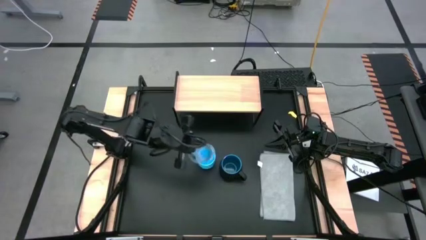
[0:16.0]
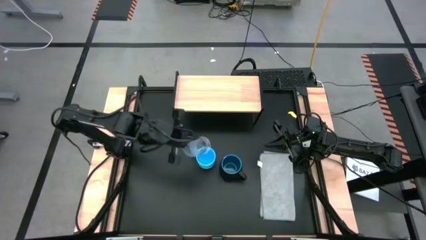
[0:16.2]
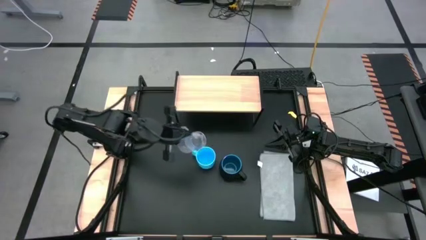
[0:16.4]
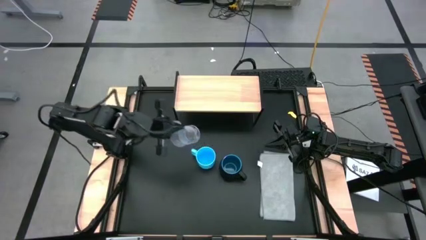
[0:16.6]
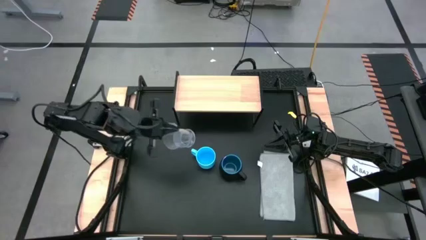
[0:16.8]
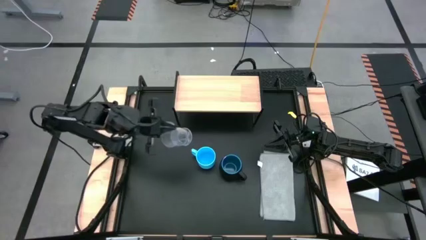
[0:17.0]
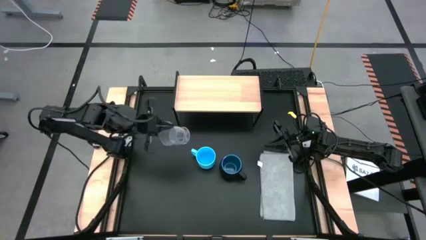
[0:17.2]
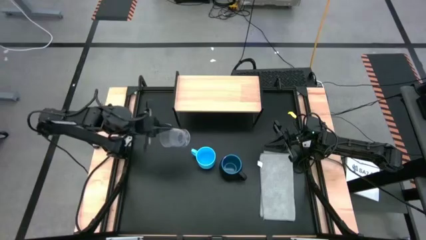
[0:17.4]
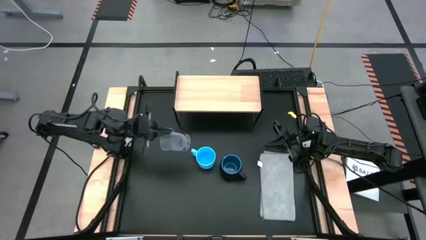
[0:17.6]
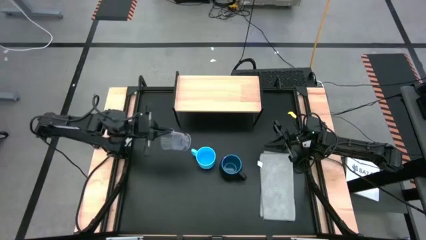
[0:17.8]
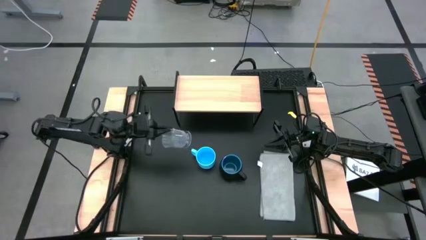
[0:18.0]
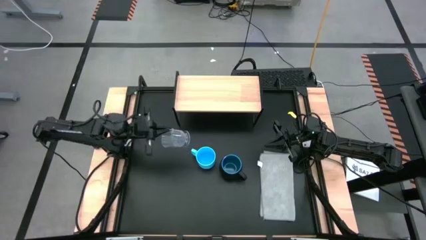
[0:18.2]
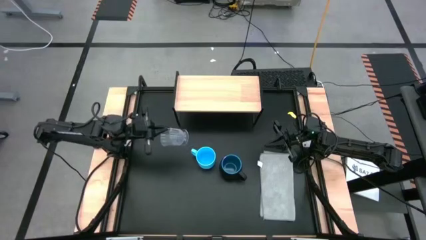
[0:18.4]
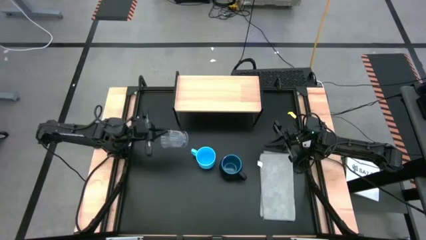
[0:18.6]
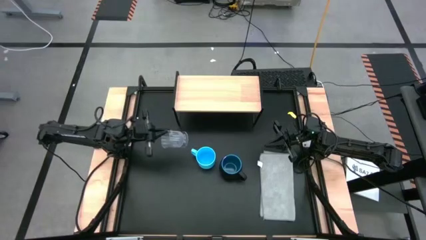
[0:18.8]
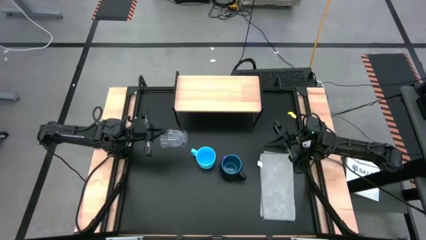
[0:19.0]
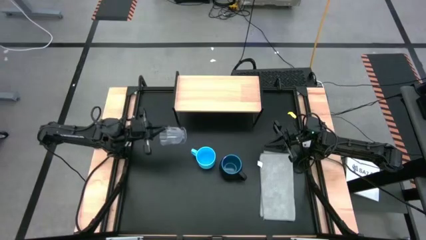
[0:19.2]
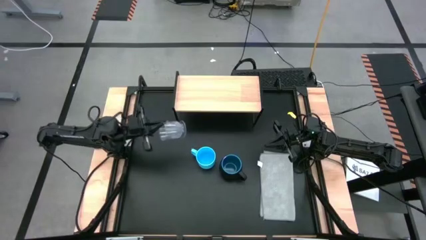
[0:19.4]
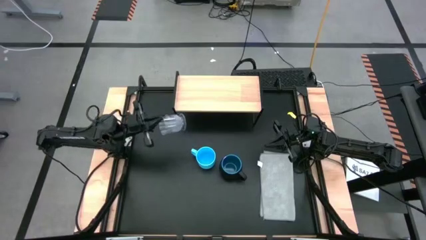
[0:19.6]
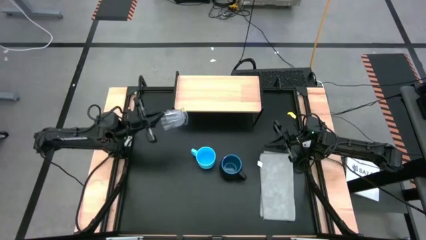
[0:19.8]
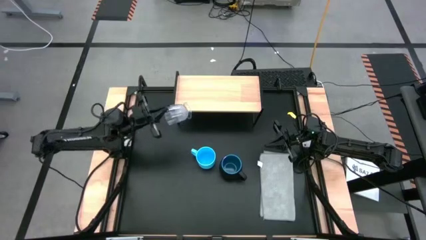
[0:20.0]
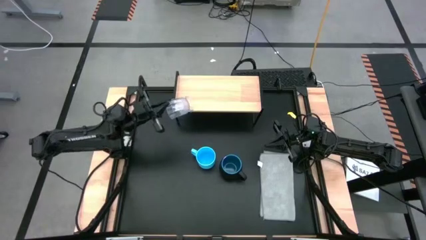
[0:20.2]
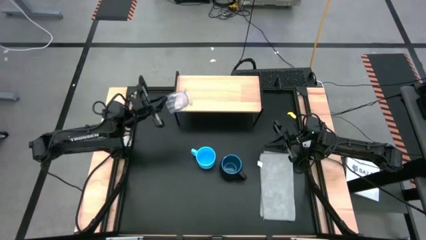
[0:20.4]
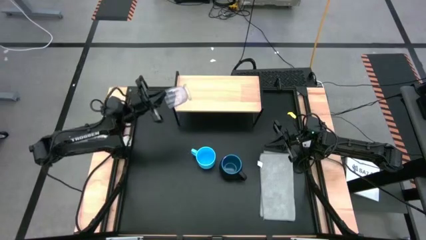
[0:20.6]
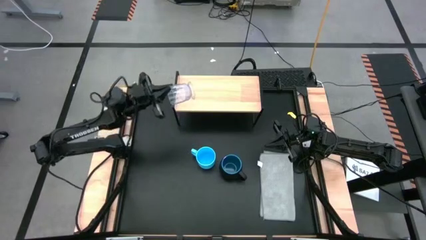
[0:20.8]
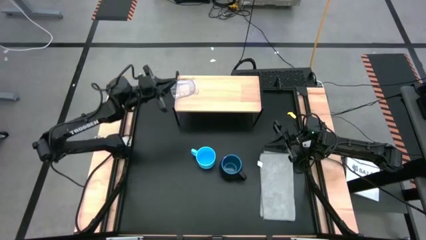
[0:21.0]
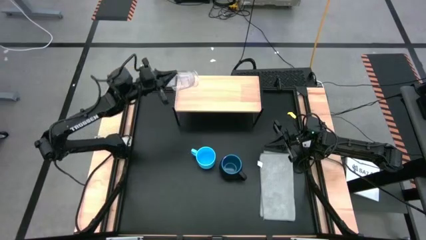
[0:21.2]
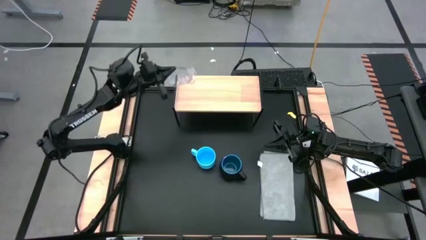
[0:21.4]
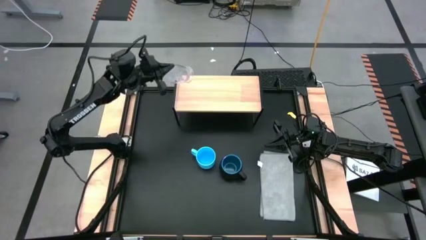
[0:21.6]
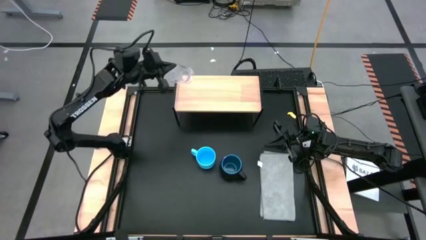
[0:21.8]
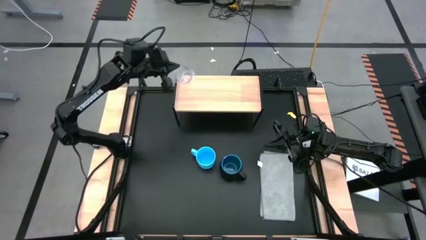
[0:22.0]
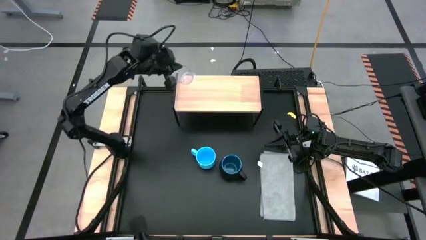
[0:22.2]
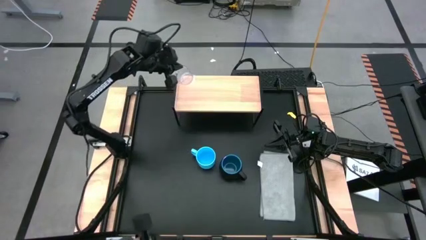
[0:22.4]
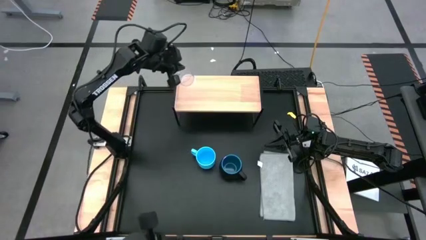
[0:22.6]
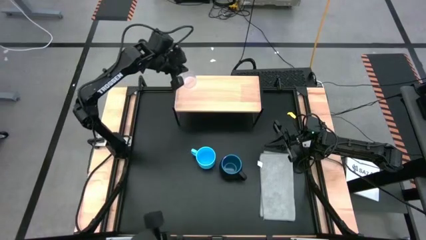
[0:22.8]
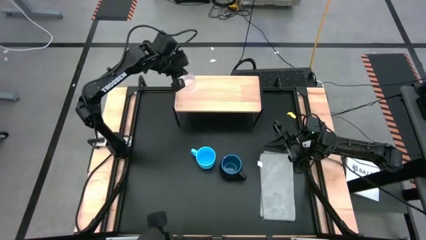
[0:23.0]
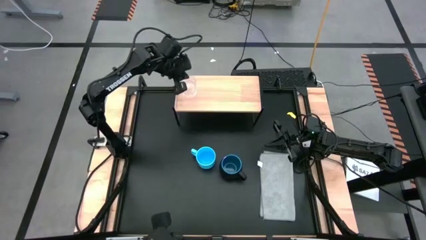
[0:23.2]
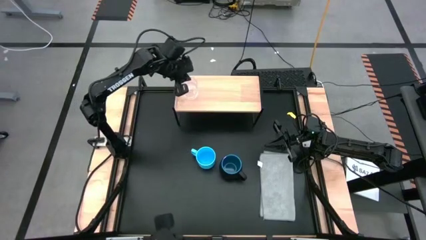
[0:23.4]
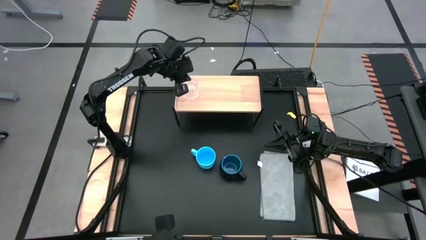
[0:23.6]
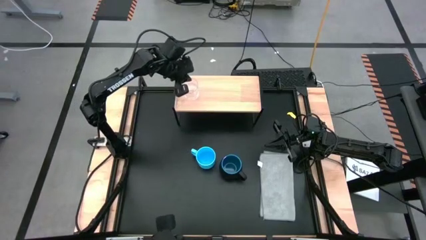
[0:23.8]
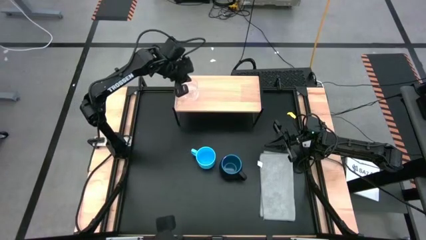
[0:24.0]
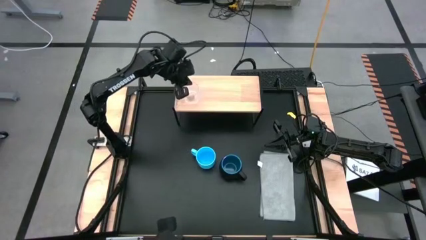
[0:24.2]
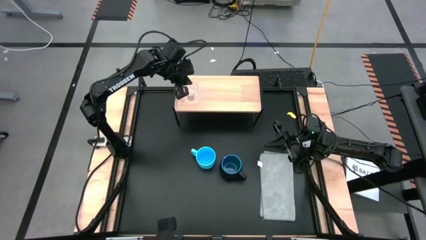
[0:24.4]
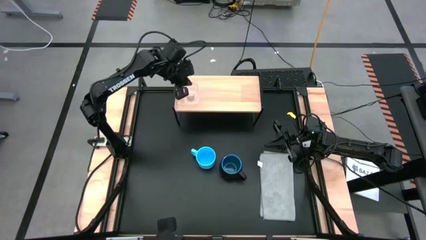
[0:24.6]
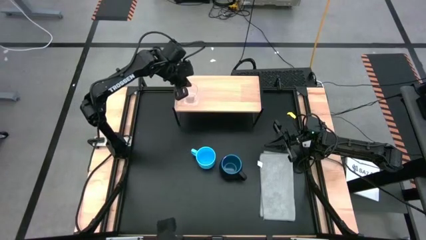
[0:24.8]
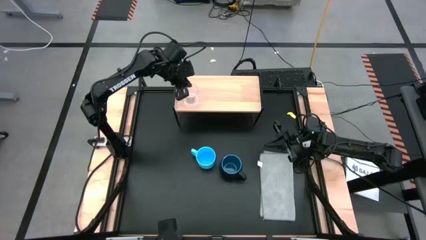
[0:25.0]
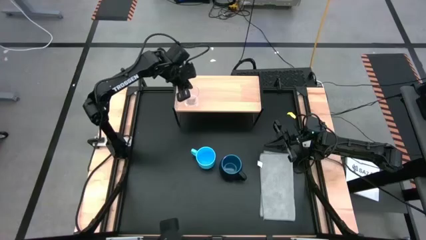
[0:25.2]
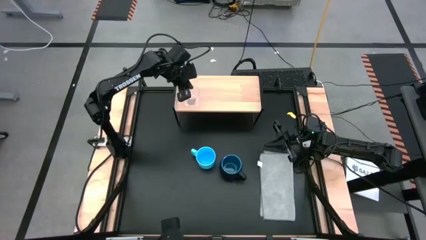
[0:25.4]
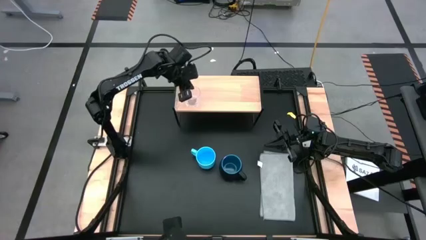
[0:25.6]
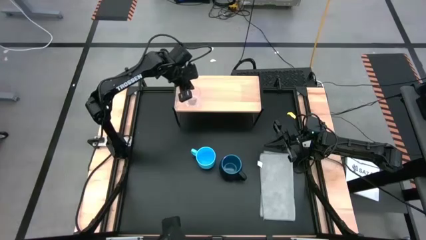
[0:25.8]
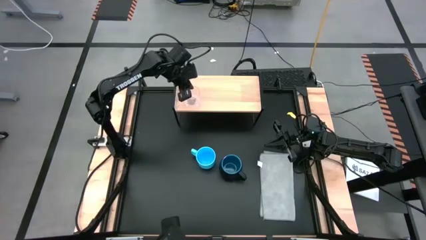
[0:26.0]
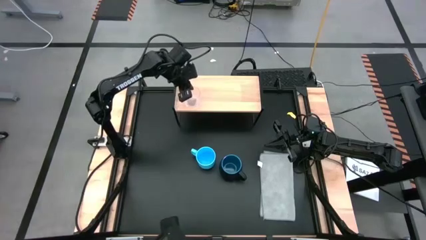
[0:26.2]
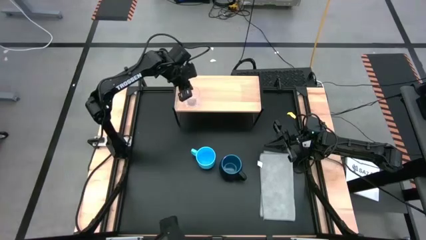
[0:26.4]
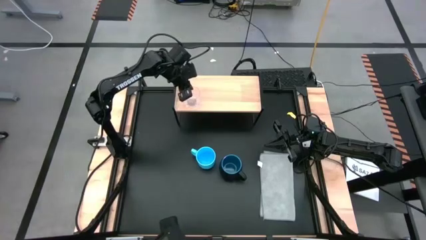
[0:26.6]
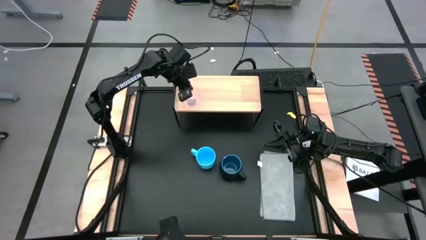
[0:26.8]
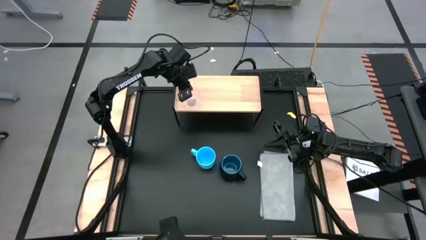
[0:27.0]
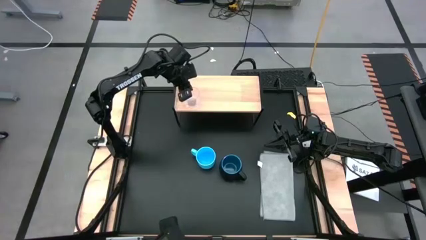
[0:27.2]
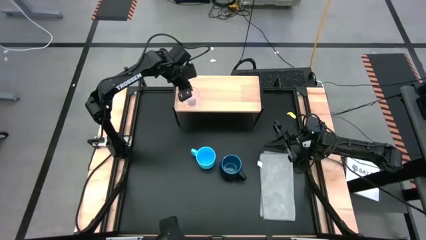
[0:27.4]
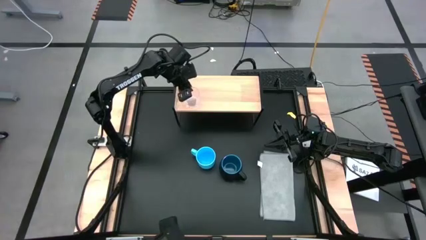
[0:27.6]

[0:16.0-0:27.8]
Task: Stack small to large cups/mugs on shelf
Put the transparent mug on the shelf
